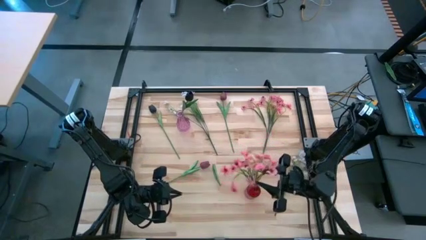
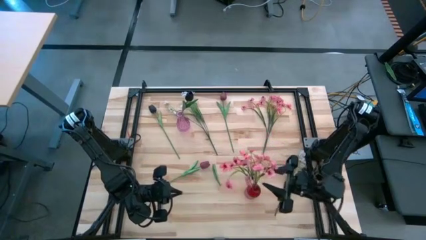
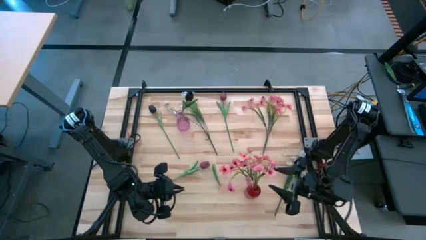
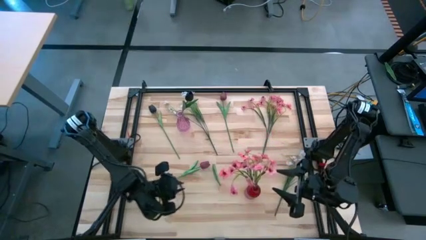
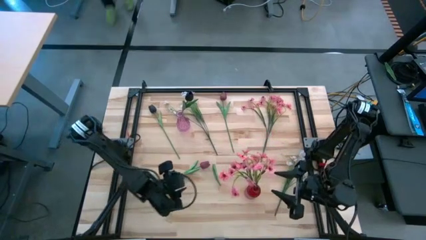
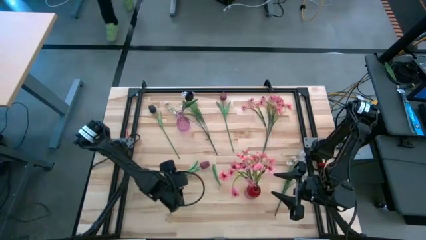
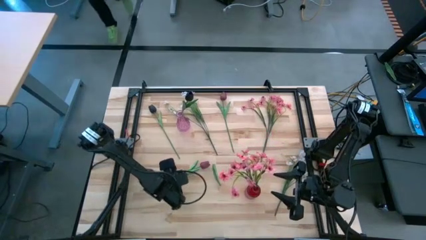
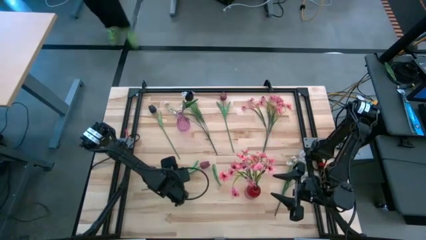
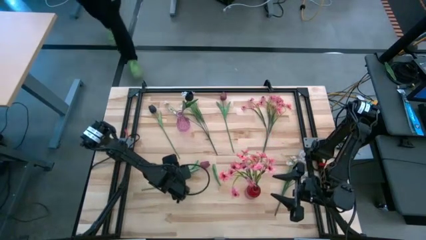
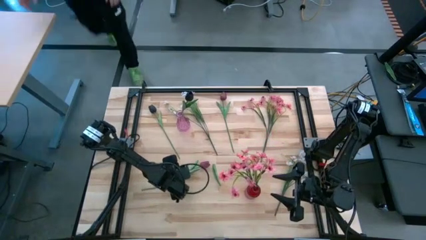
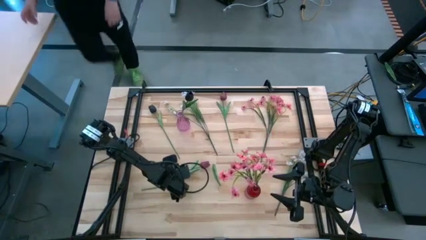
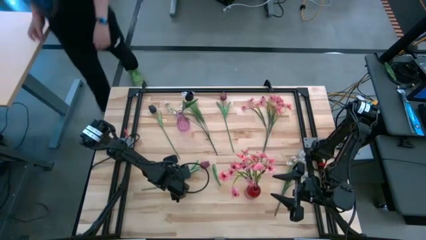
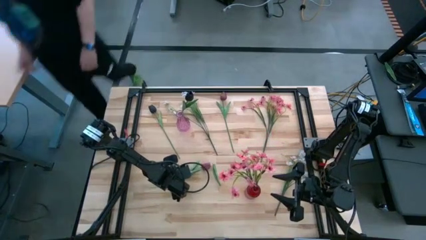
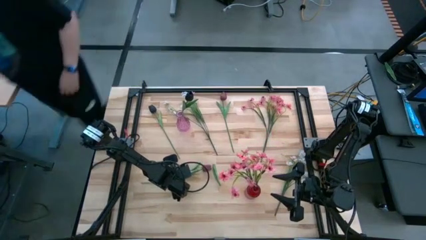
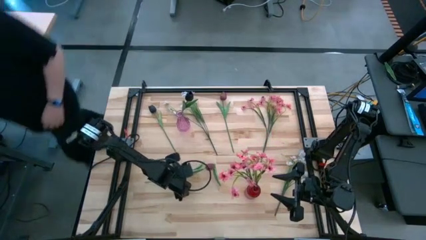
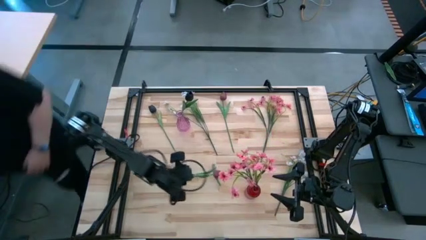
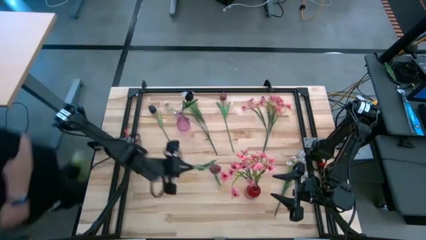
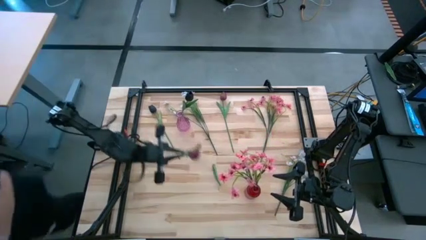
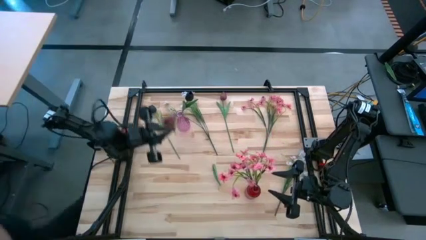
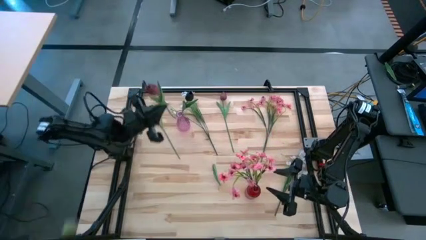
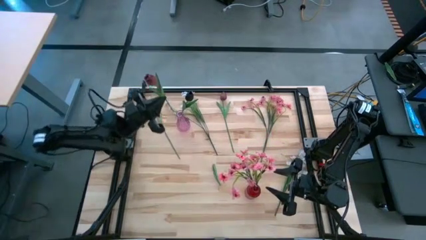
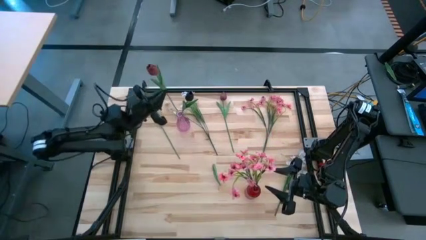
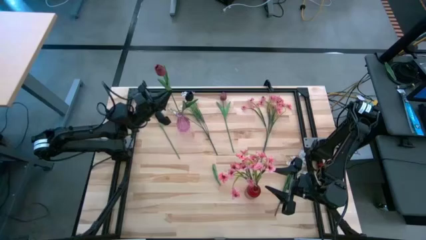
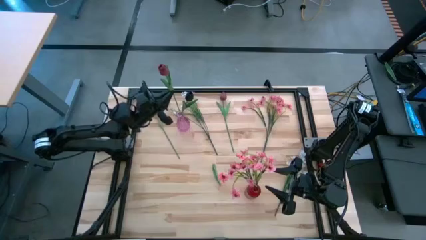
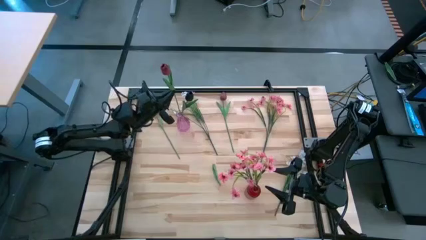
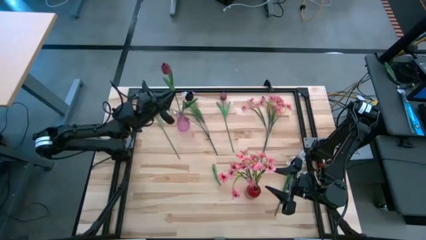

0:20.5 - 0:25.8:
Task: Sort flowers into vase by color
Put the bottom red flower into the purple vase

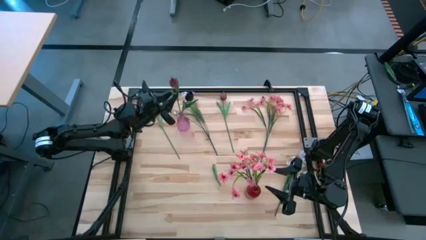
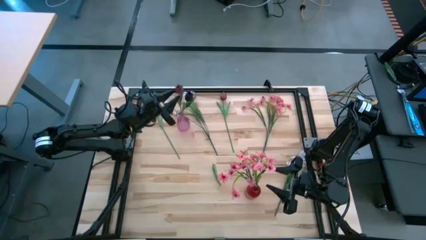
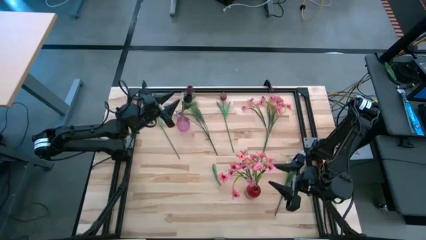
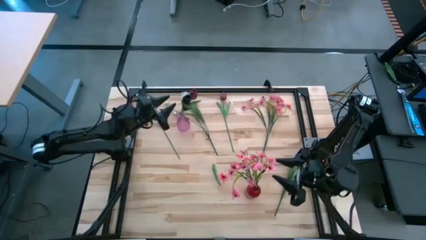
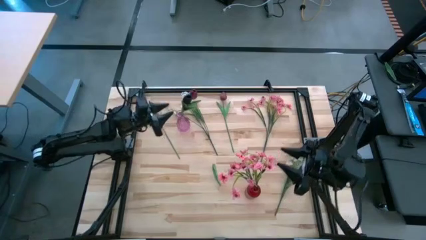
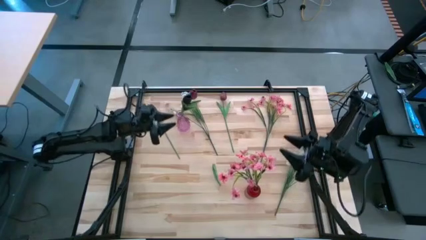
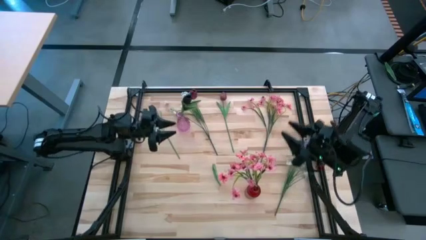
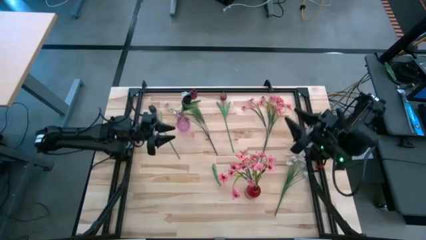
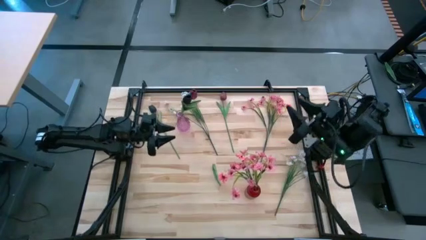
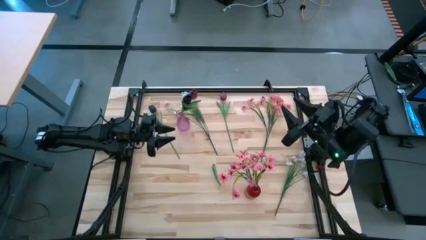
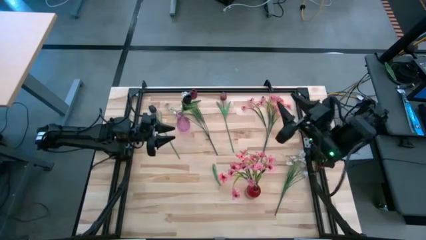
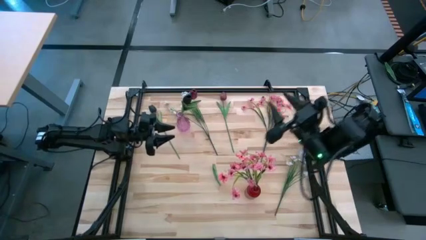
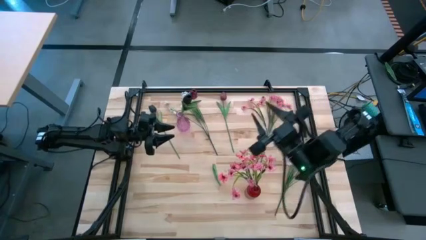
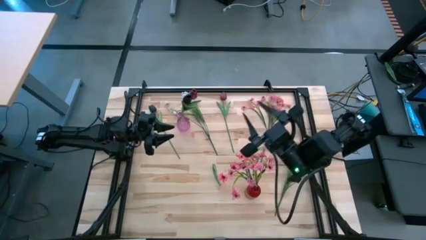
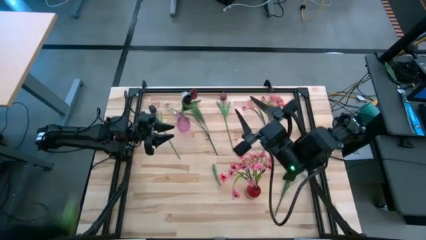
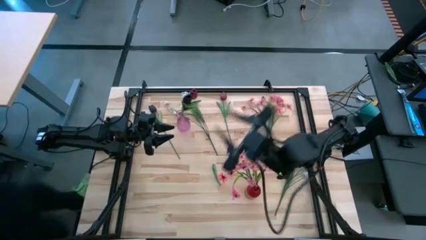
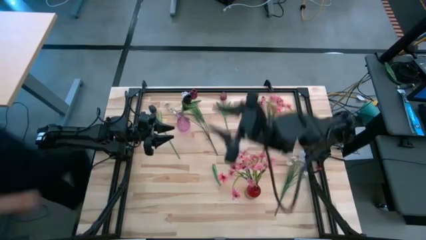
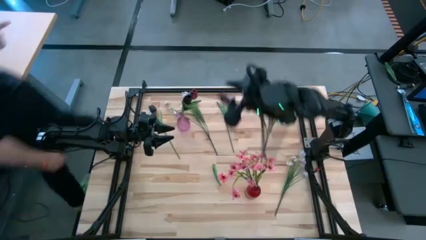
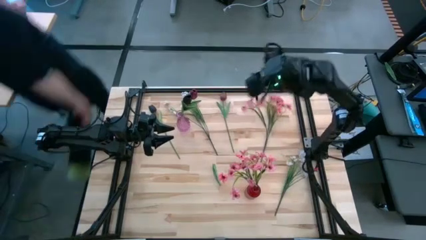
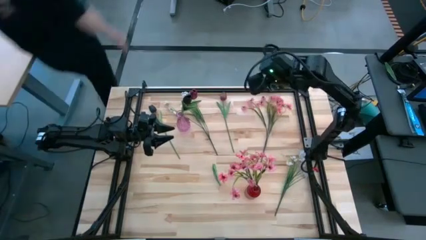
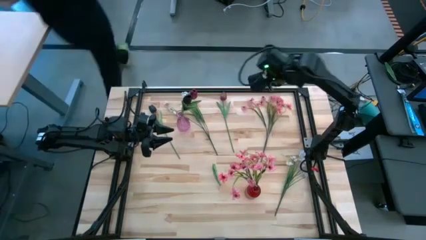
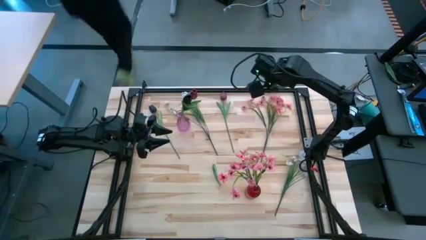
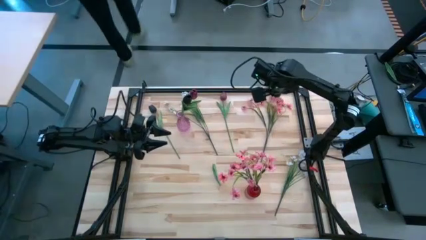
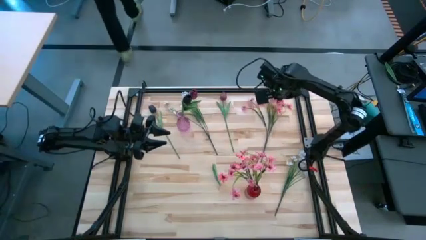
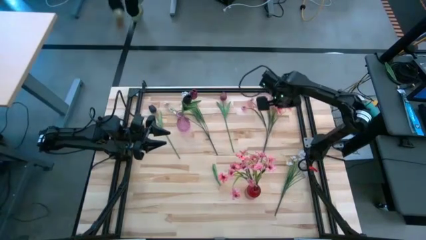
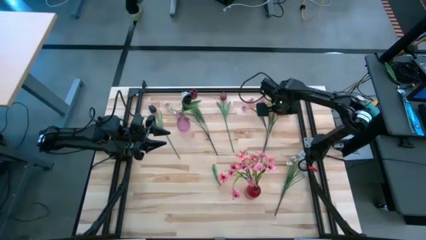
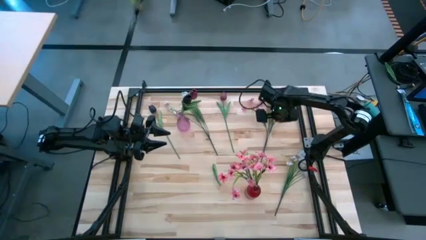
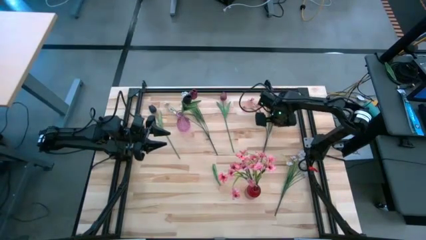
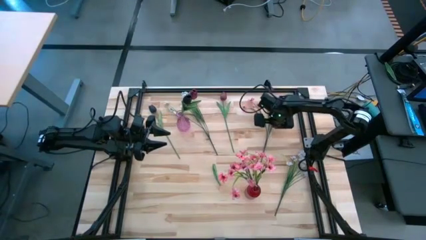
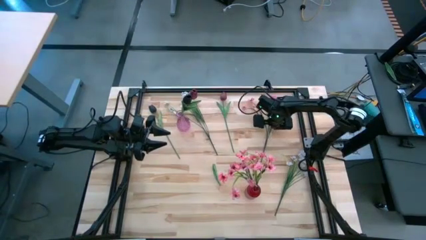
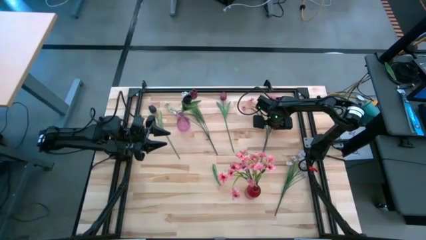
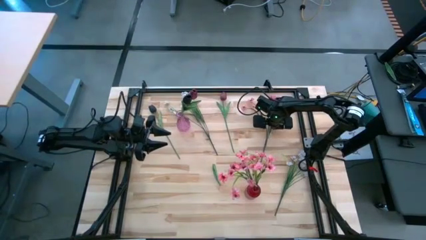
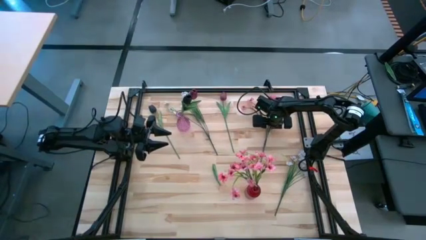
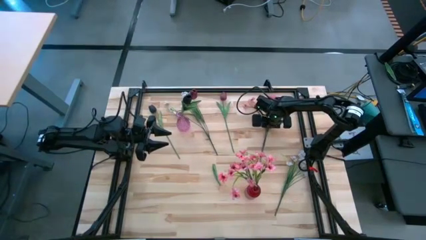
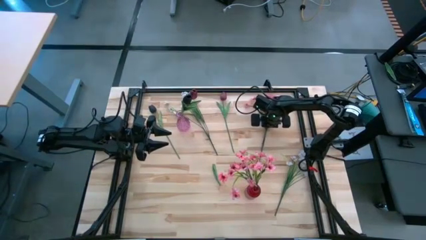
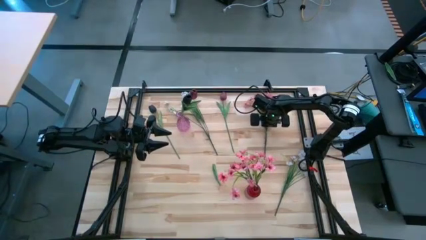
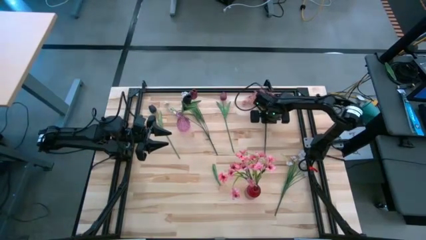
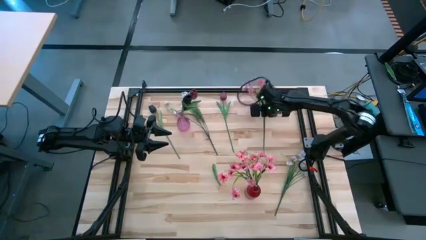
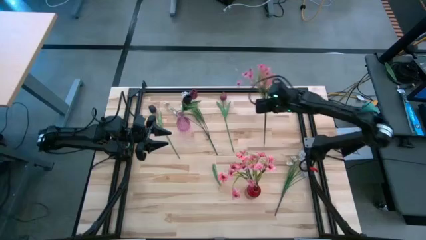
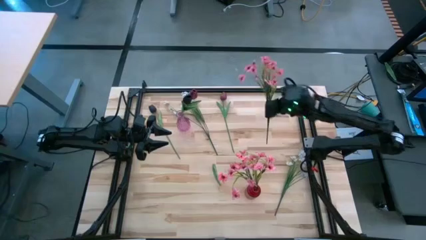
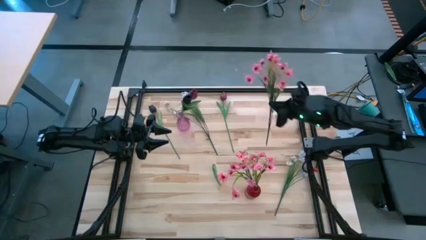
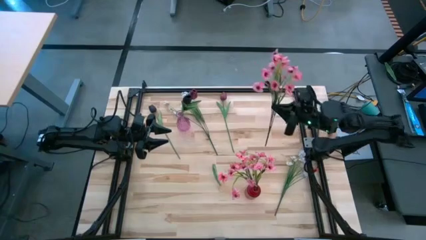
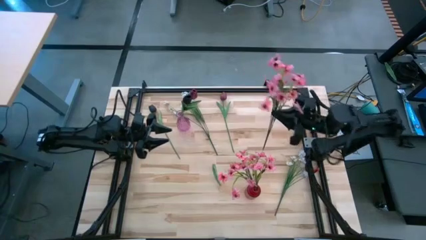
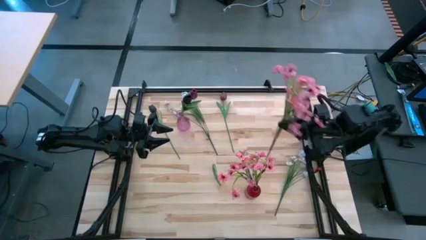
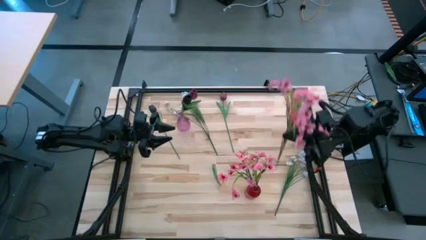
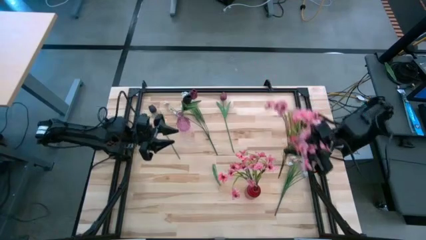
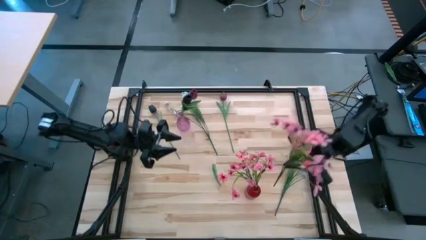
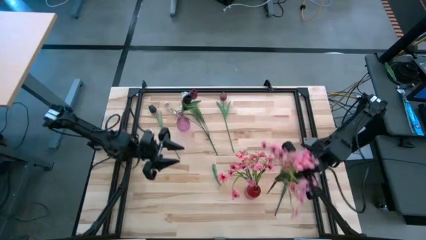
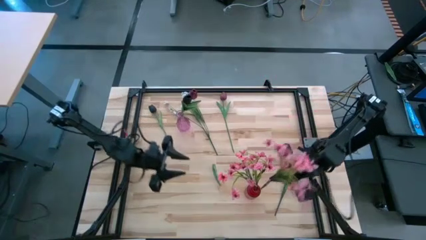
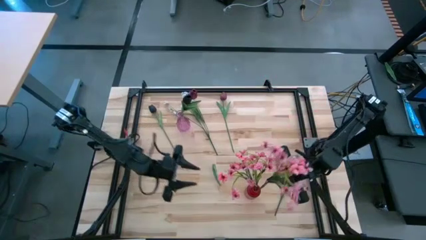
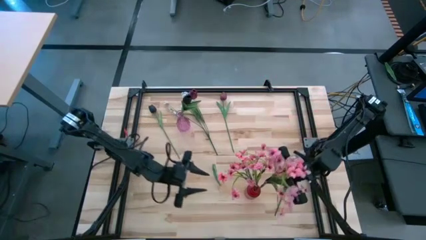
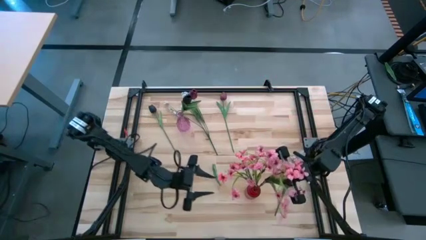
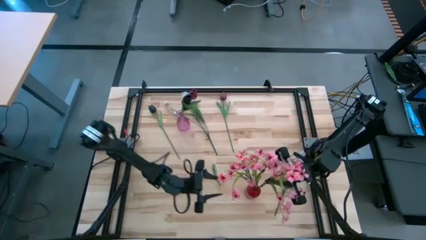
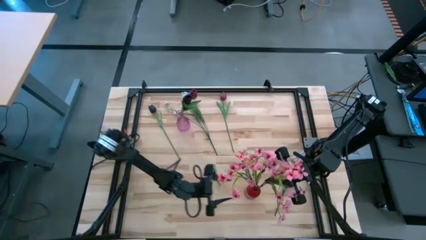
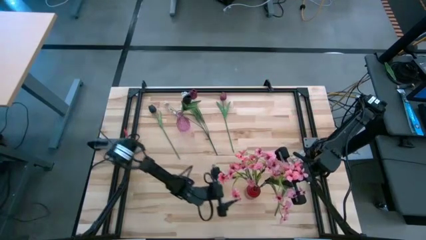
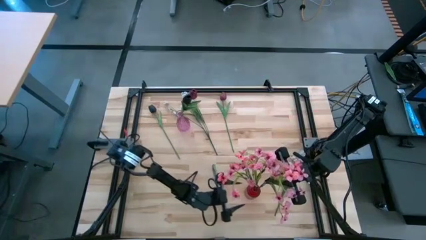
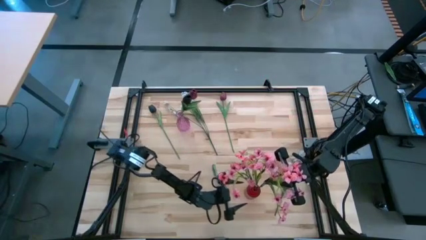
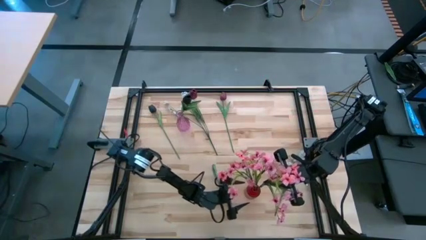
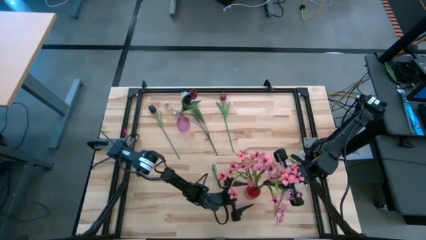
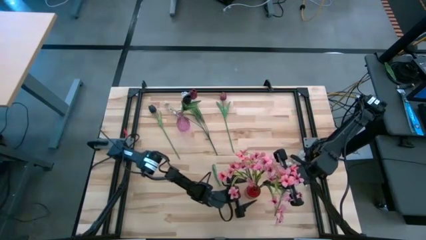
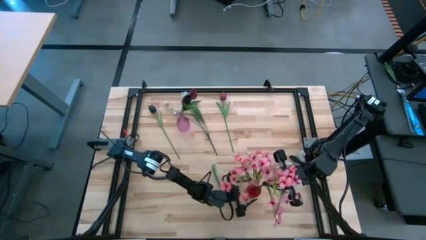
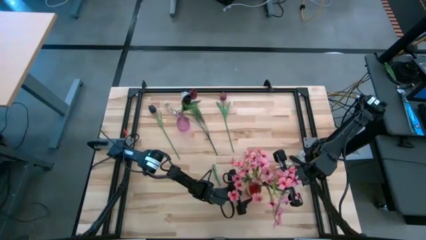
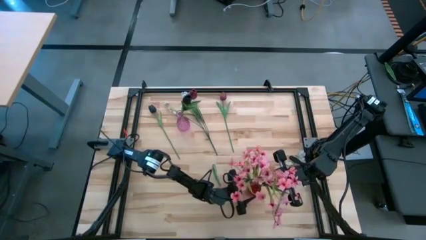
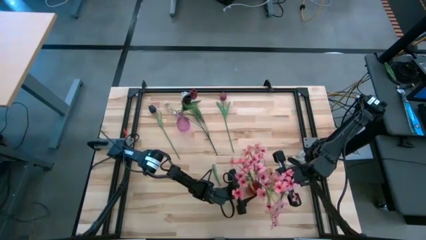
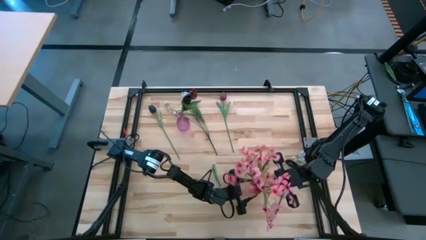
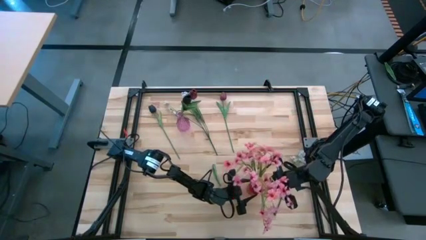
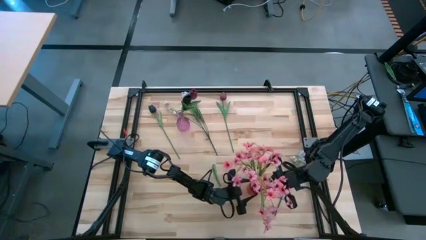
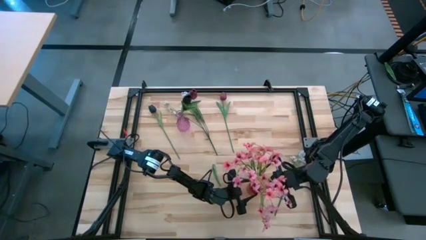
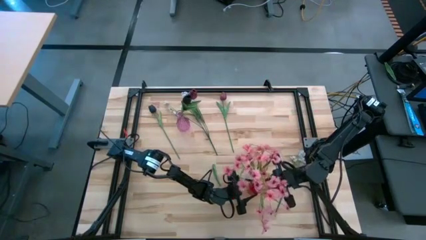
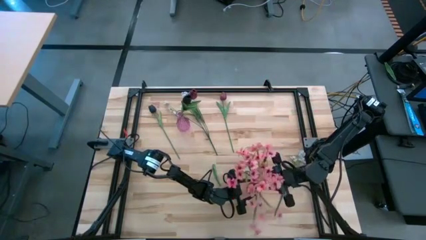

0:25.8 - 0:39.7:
Put the pink flowers into the red vase
